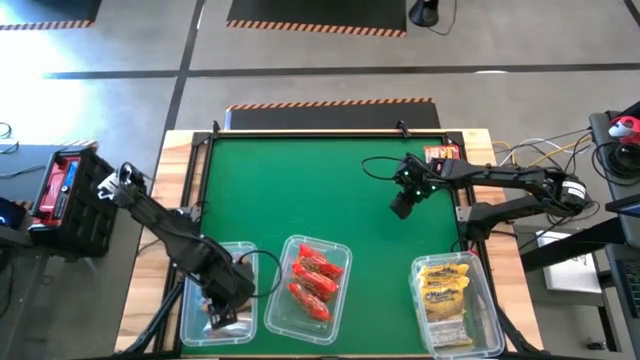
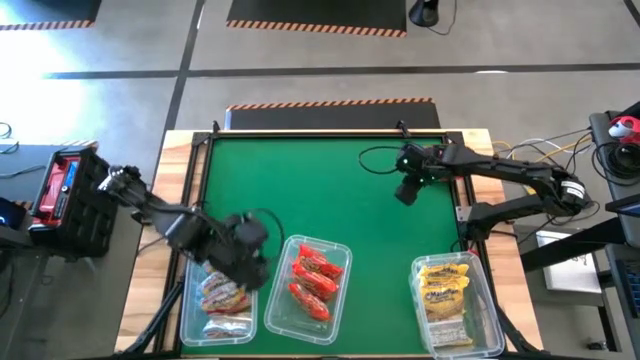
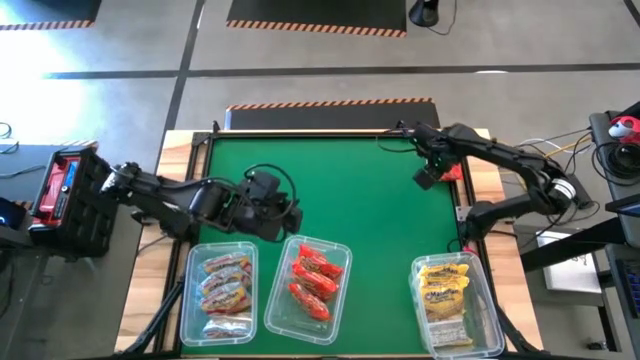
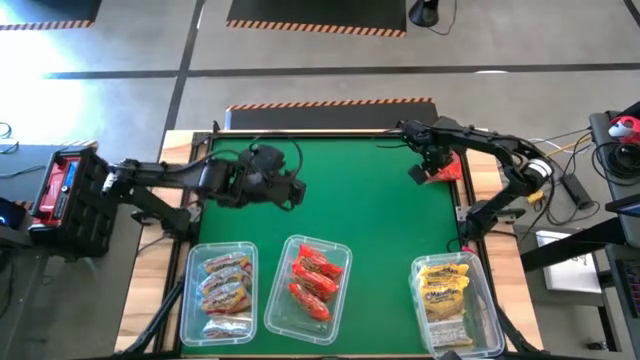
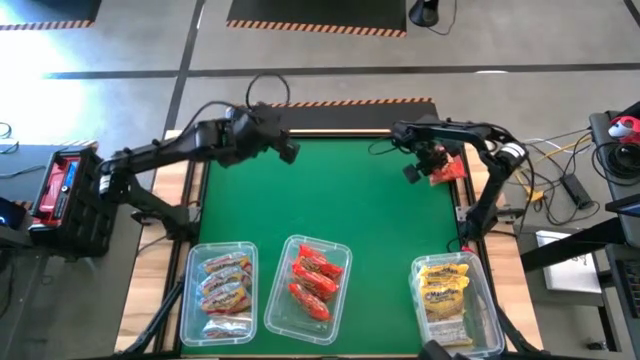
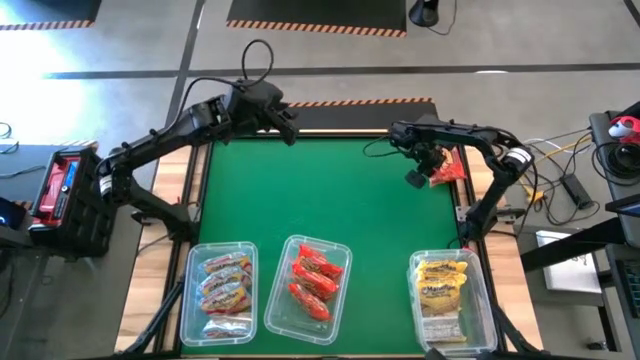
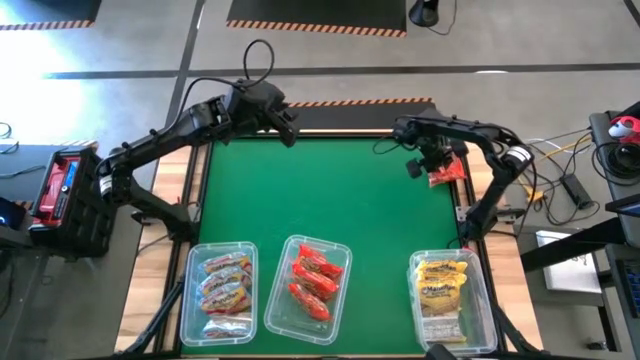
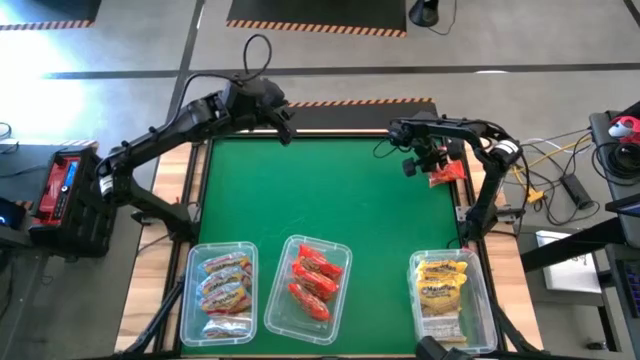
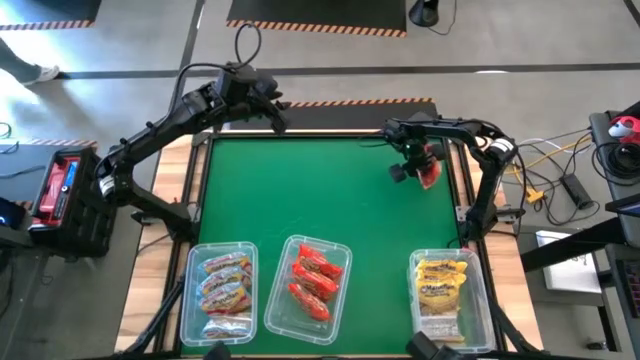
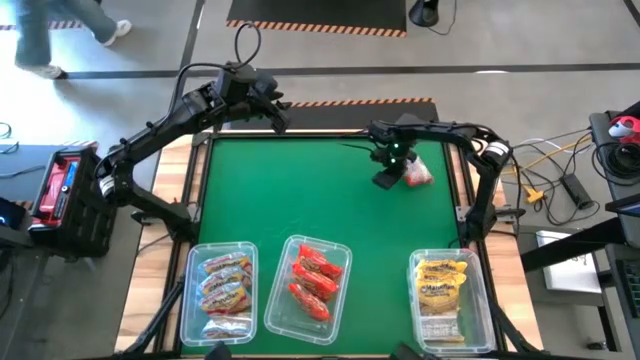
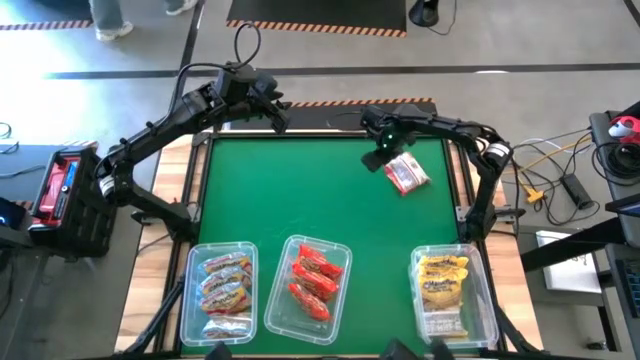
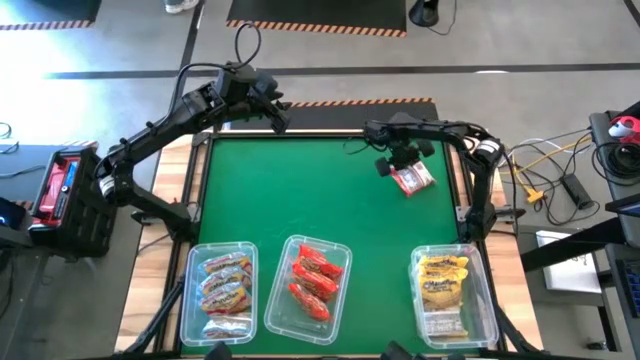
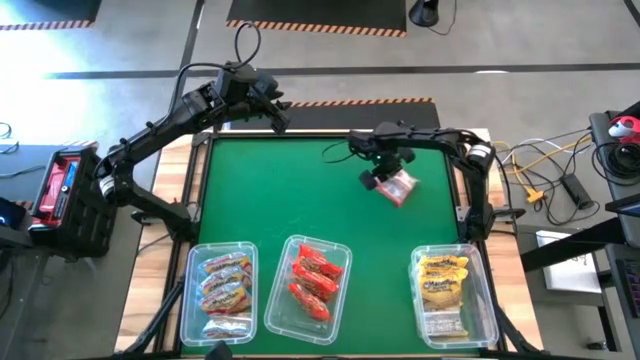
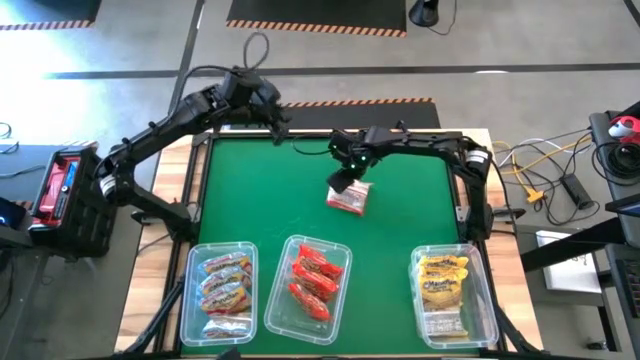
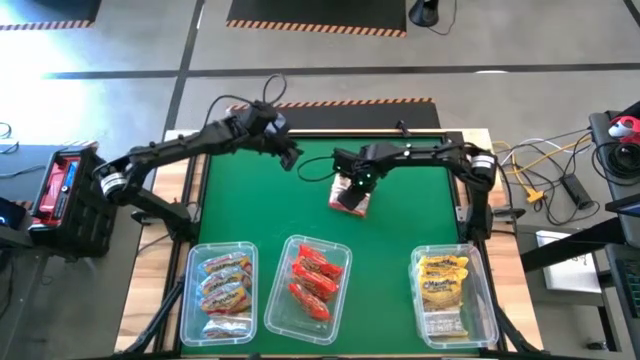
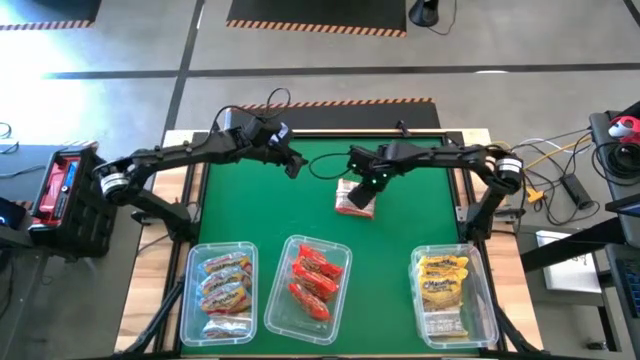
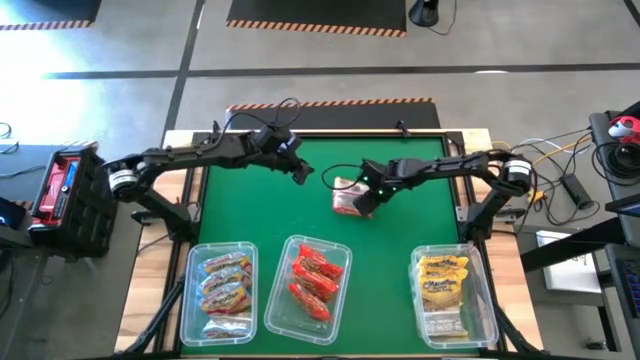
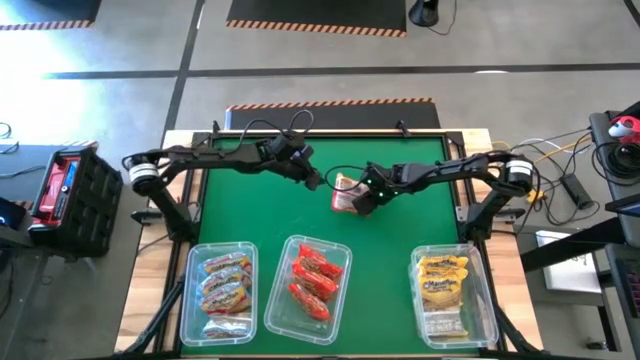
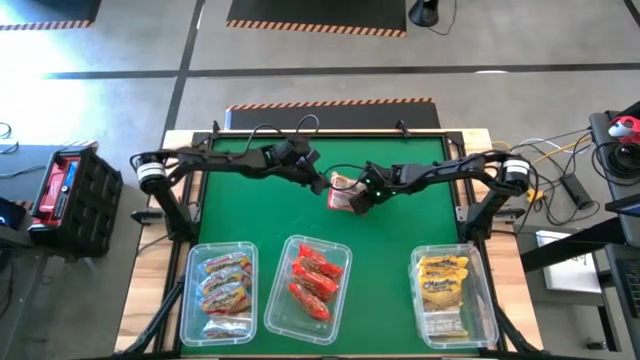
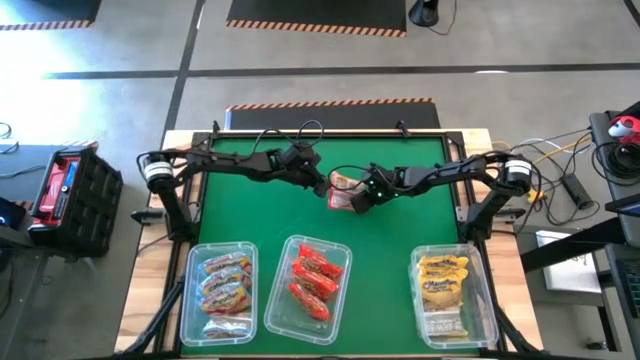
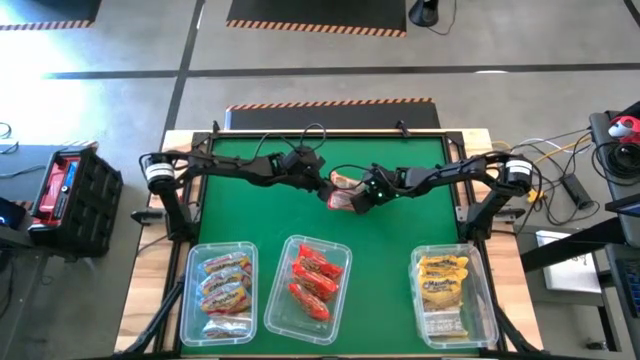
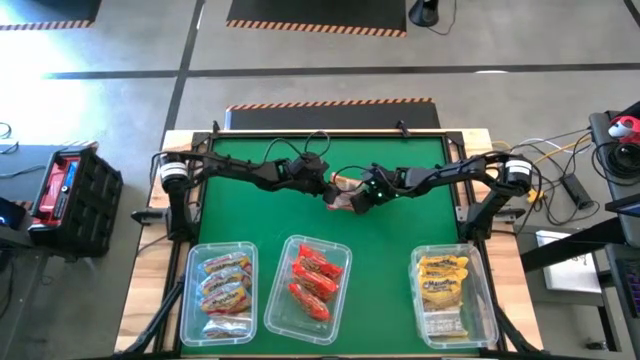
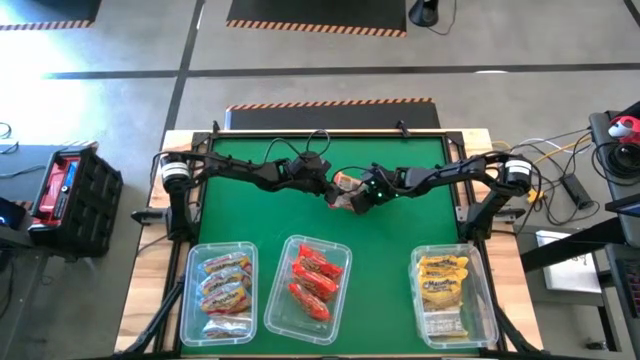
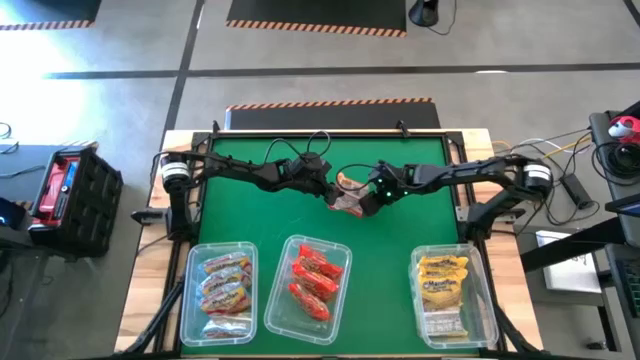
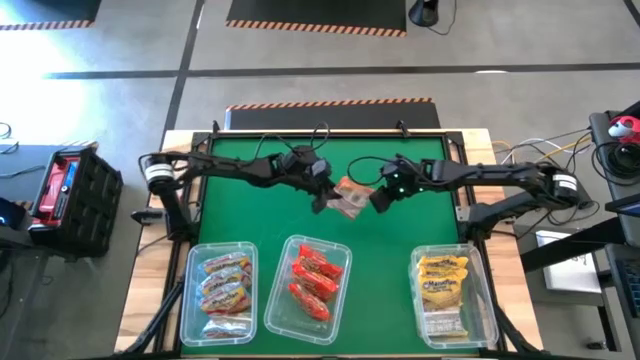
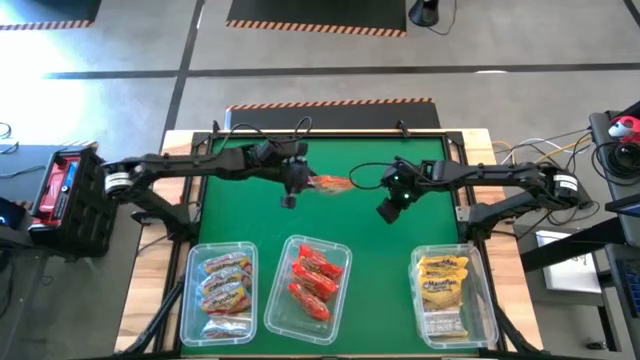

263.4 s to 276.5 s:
Task: Sort Maruchan noodles
Put the orange noodle pack into the middle transparent bin

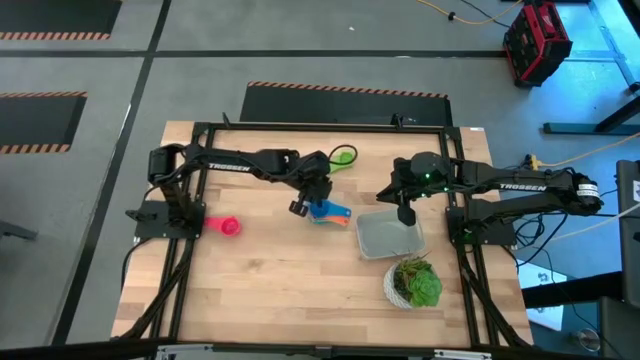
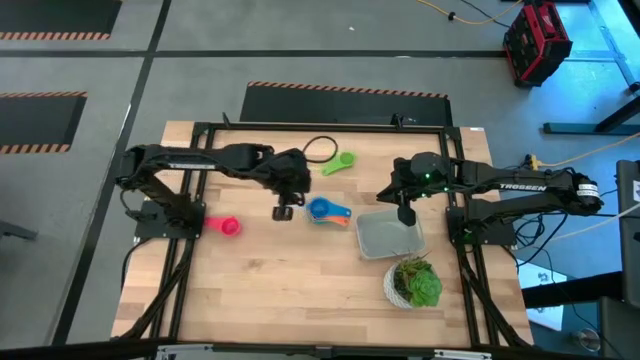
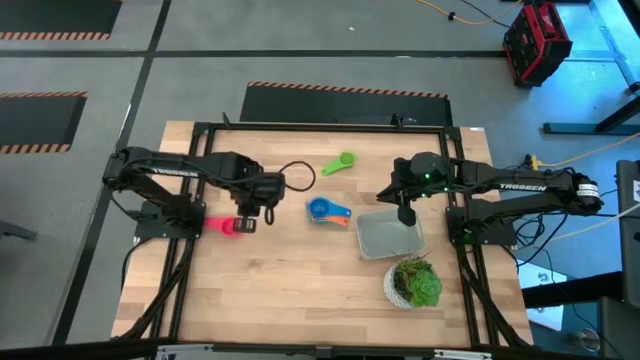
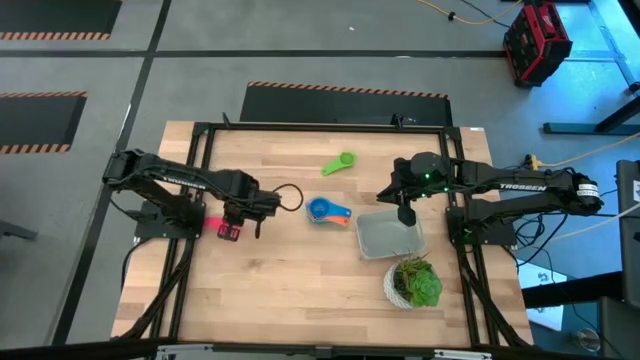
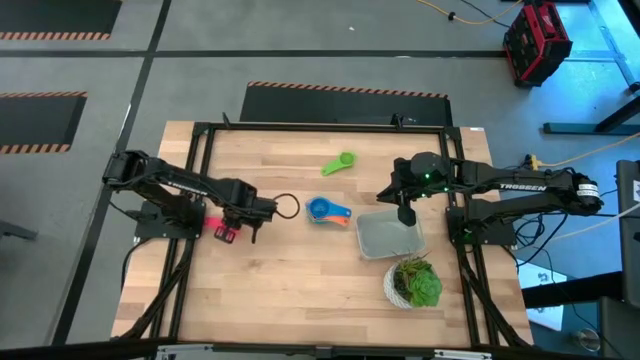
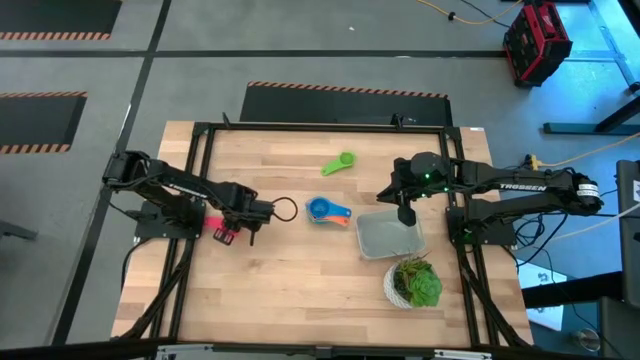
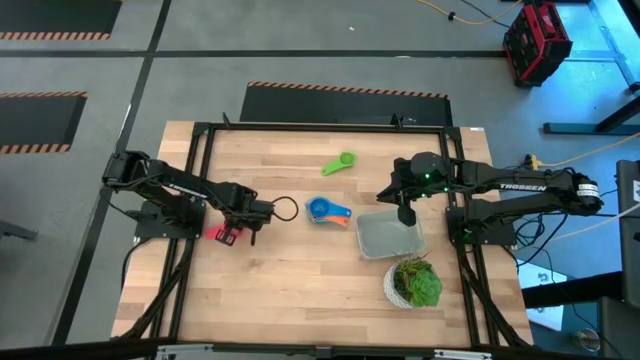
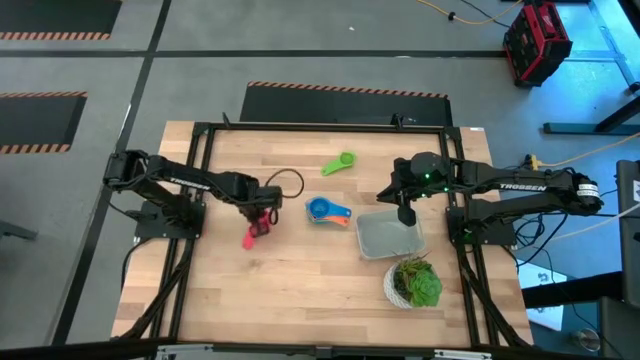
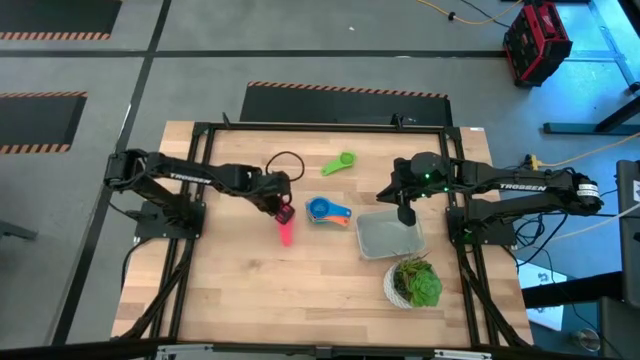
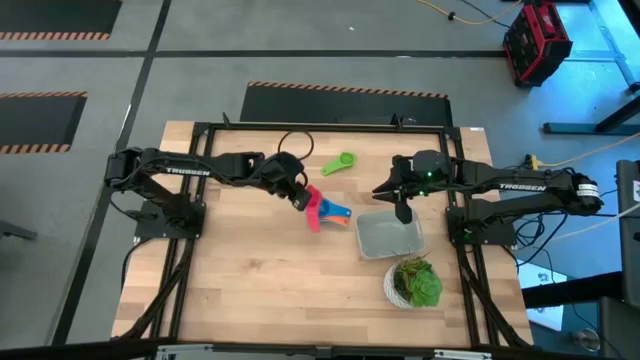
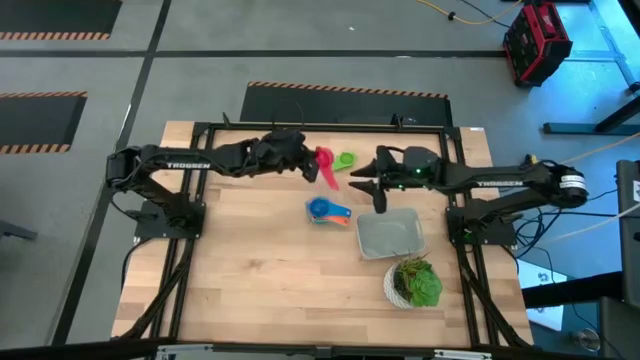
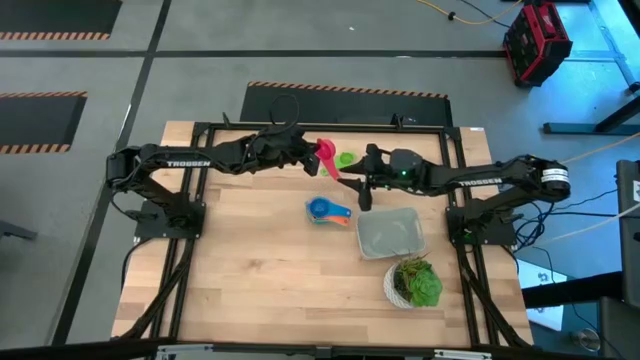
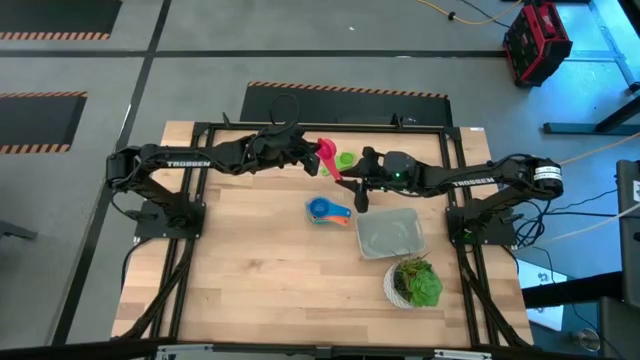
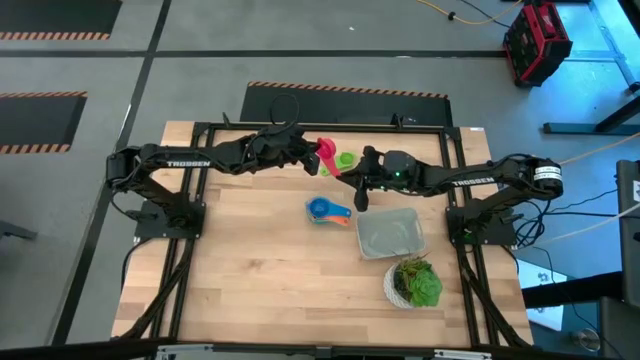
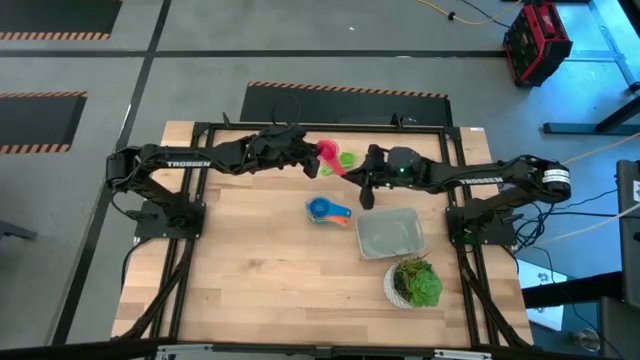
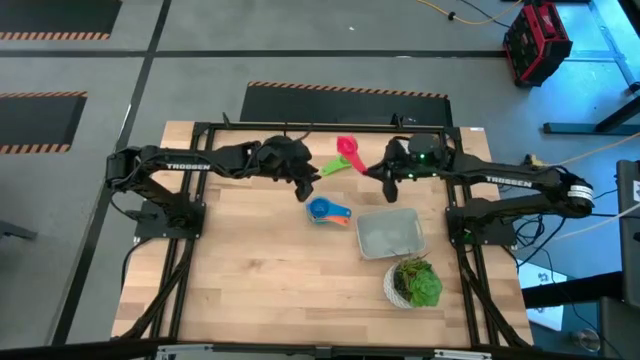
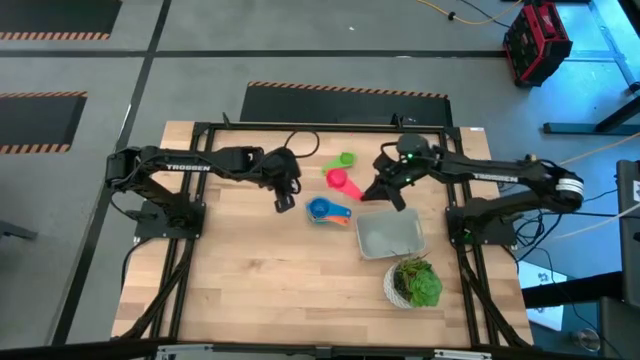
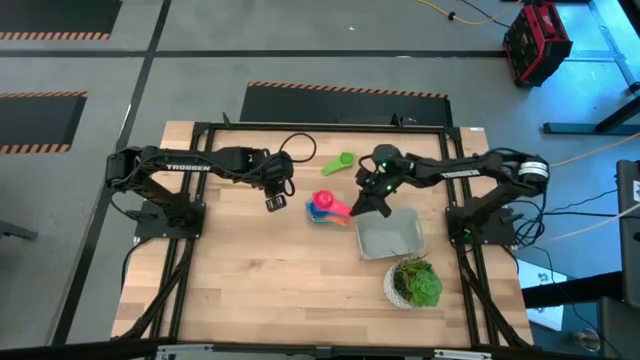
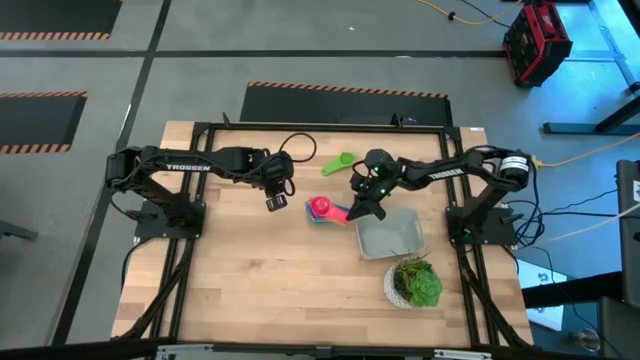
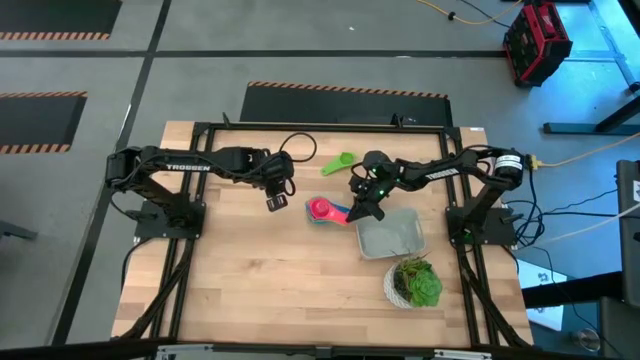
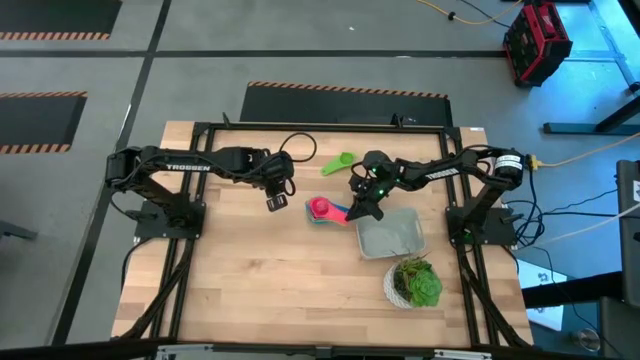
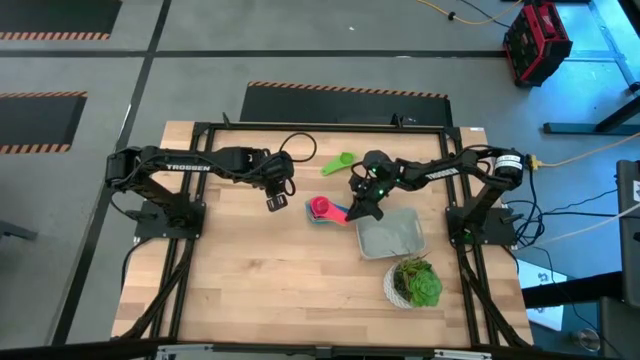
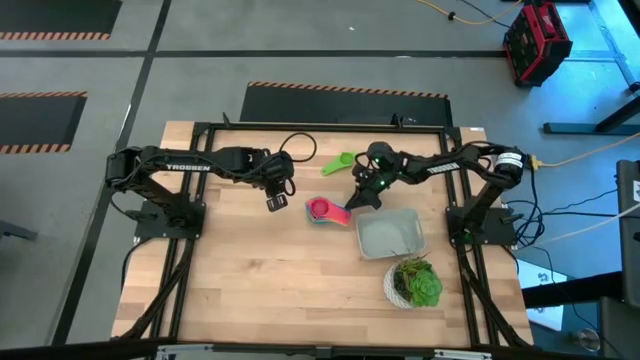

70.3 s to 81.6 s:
Task: Nest measuring cups in basket
Stack the pink measuring cup on top of the blue measuring cup
